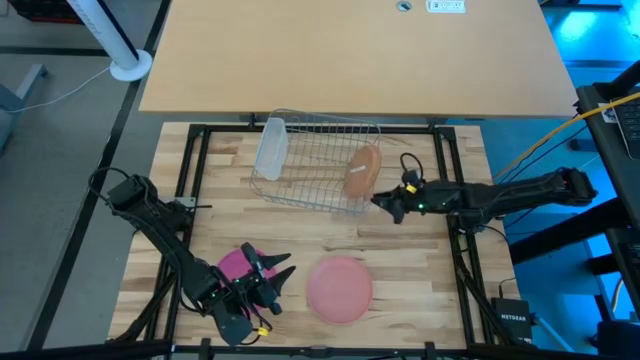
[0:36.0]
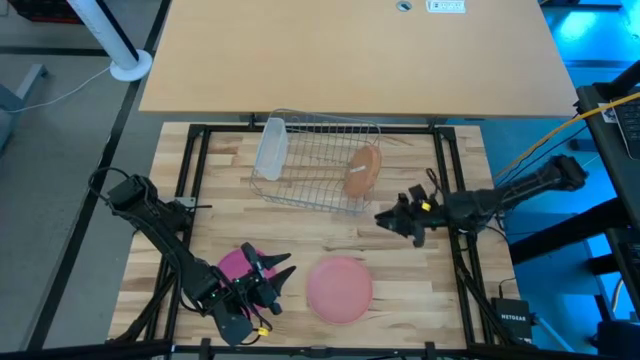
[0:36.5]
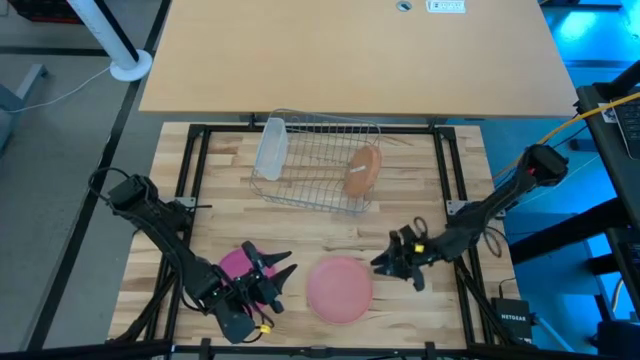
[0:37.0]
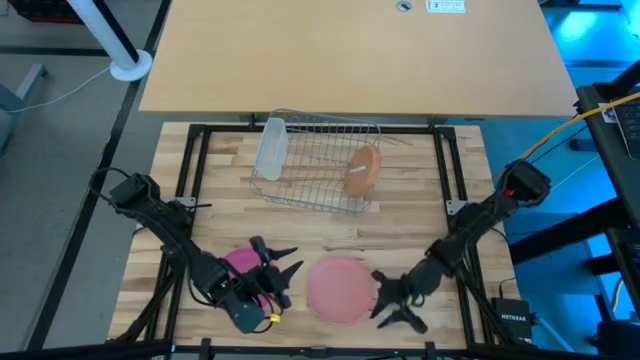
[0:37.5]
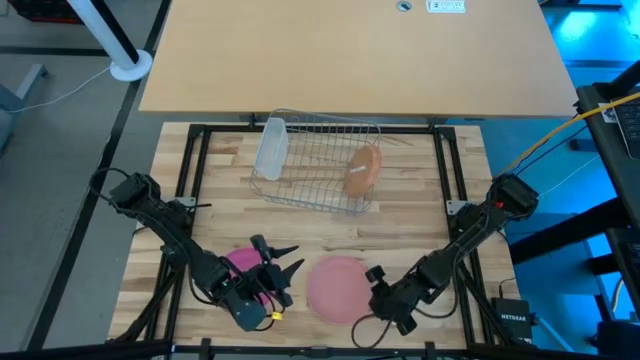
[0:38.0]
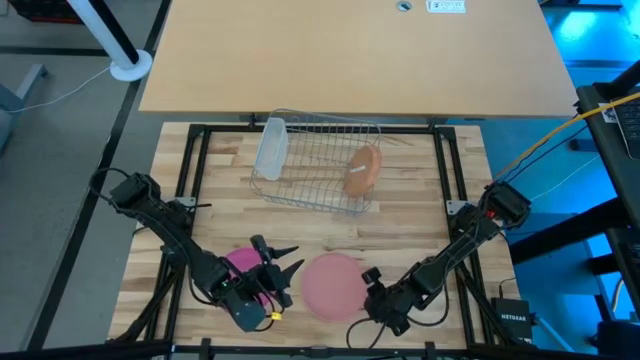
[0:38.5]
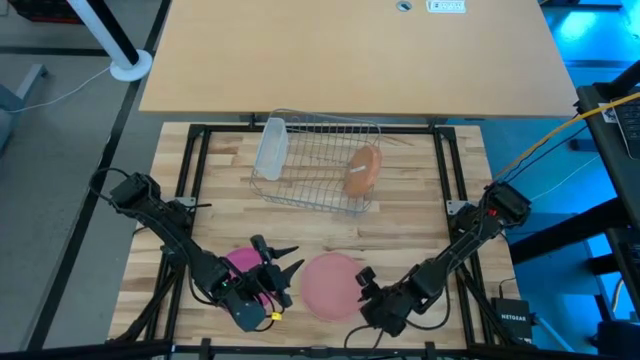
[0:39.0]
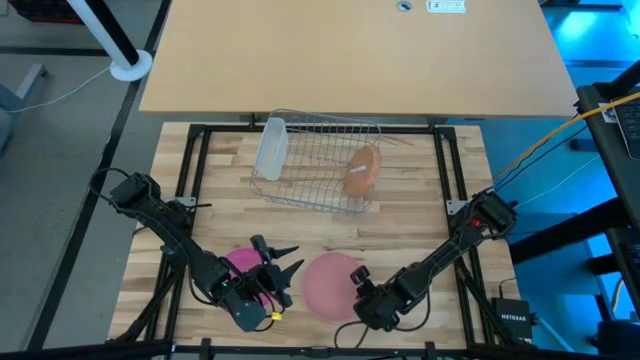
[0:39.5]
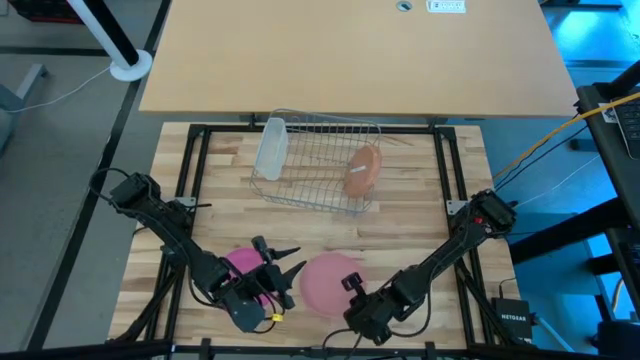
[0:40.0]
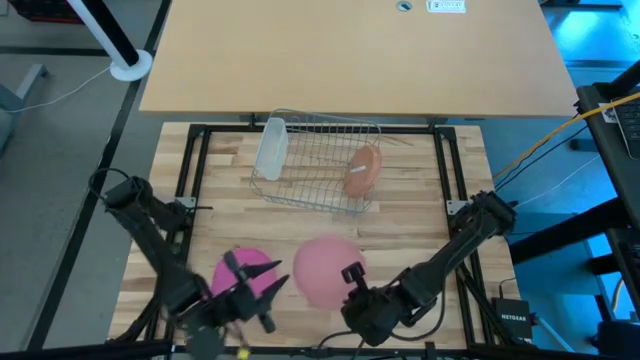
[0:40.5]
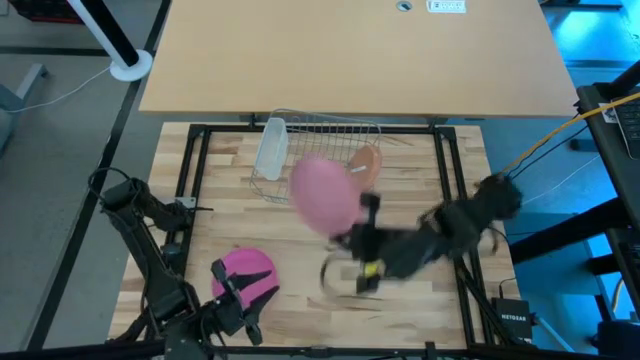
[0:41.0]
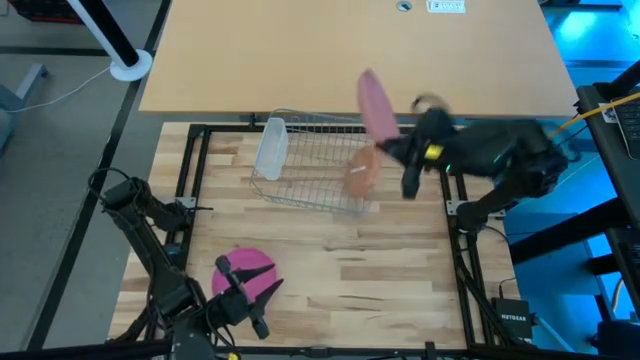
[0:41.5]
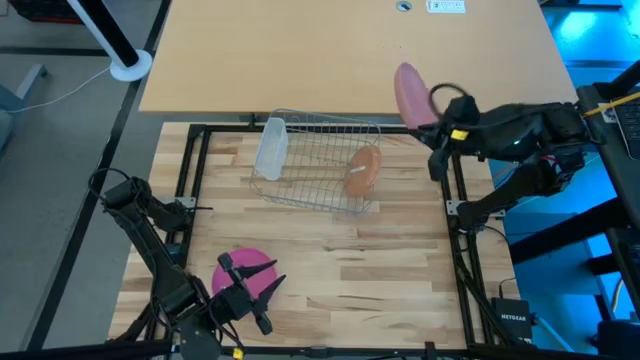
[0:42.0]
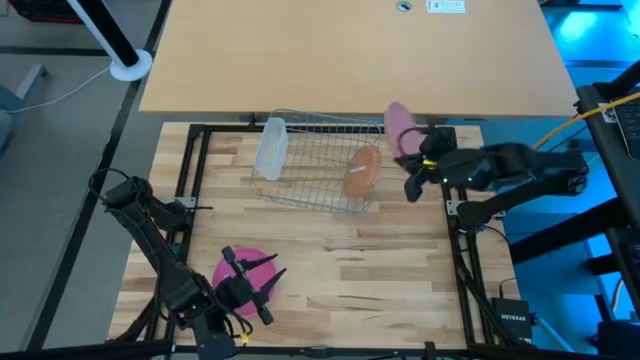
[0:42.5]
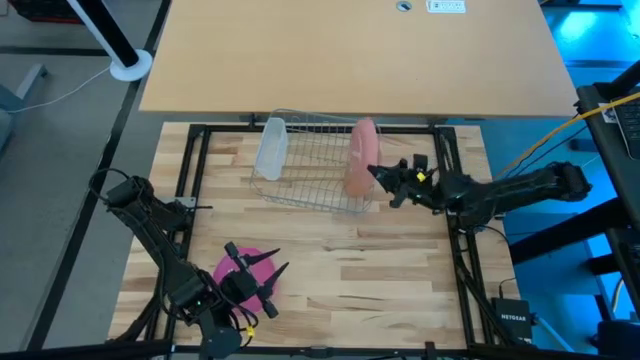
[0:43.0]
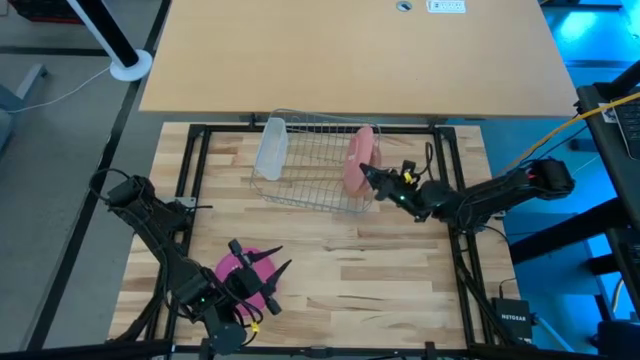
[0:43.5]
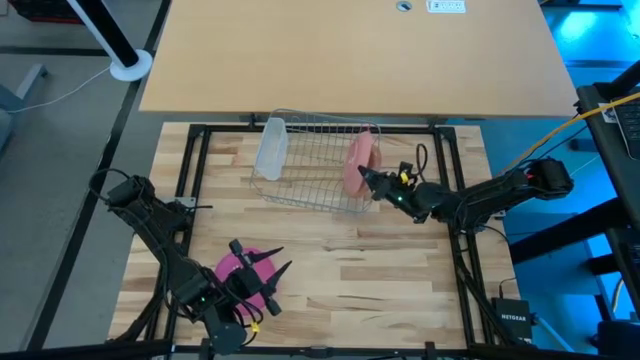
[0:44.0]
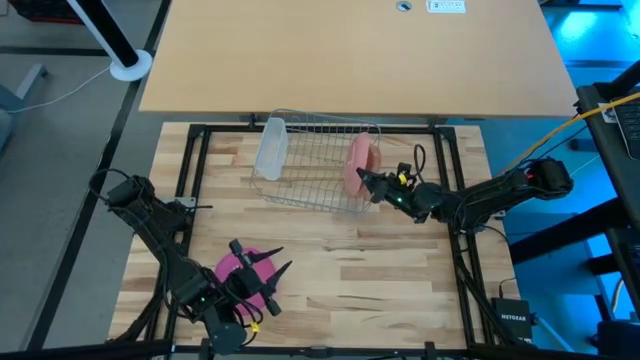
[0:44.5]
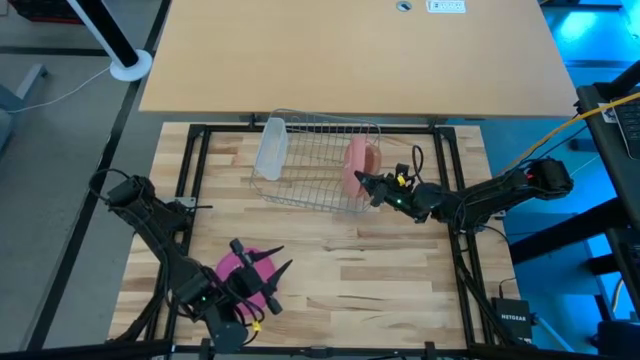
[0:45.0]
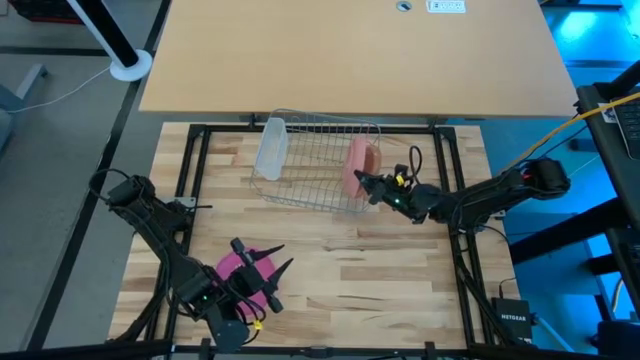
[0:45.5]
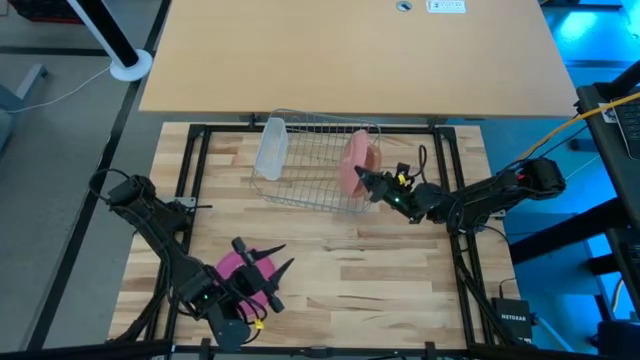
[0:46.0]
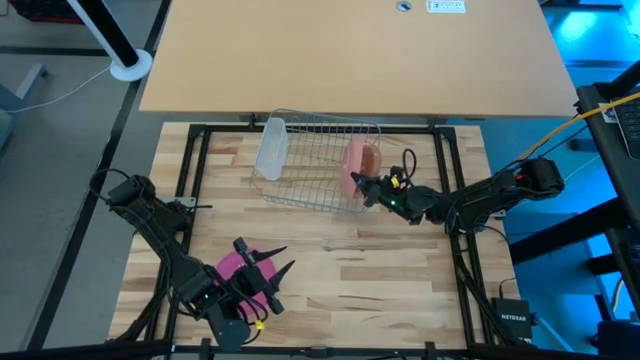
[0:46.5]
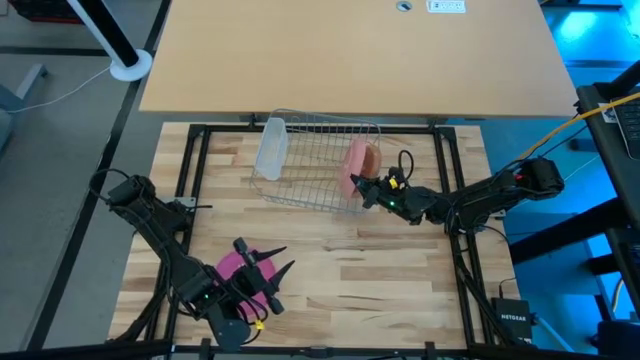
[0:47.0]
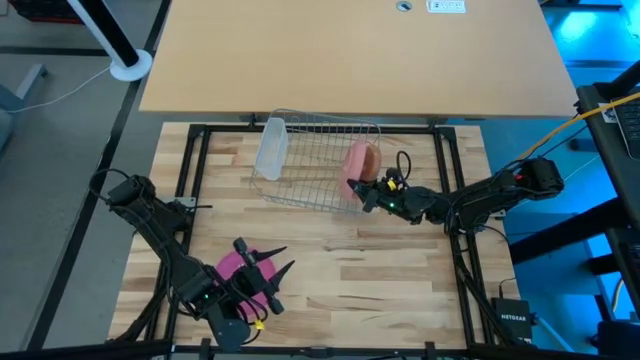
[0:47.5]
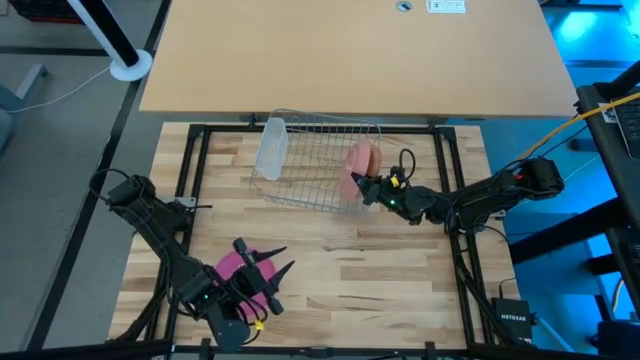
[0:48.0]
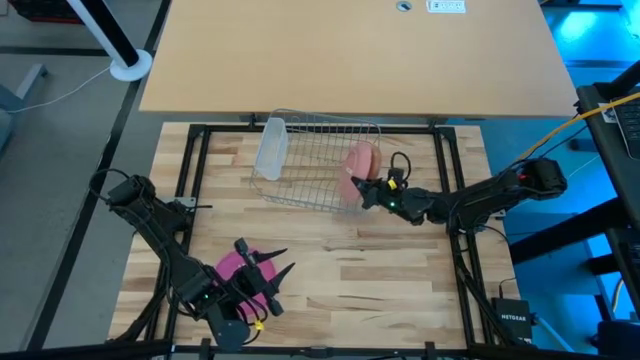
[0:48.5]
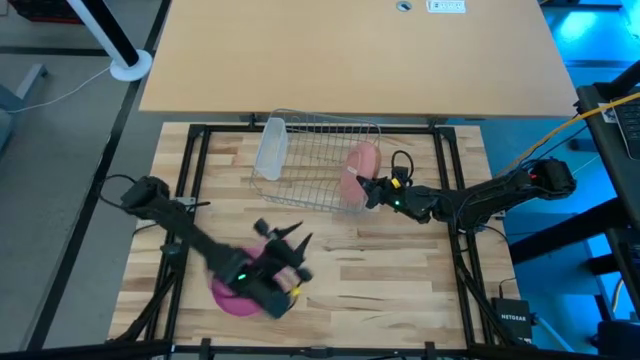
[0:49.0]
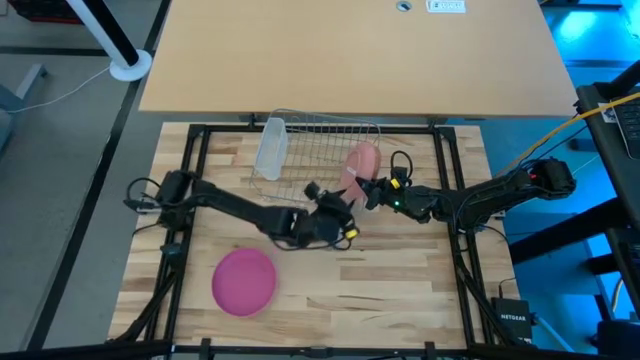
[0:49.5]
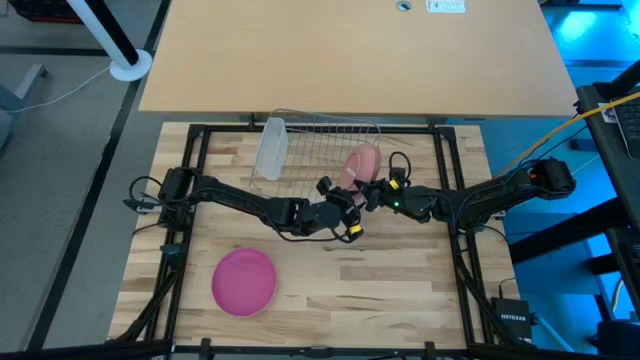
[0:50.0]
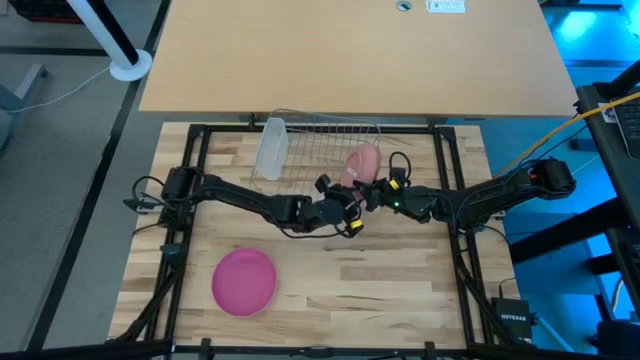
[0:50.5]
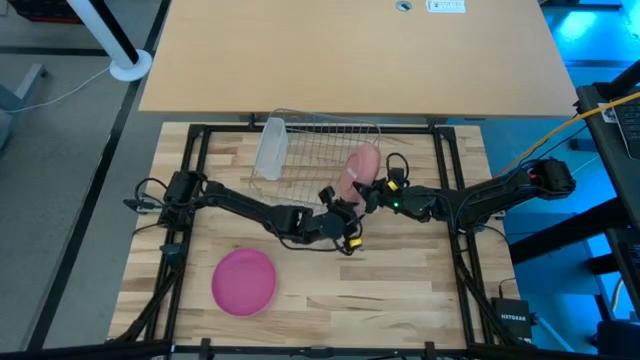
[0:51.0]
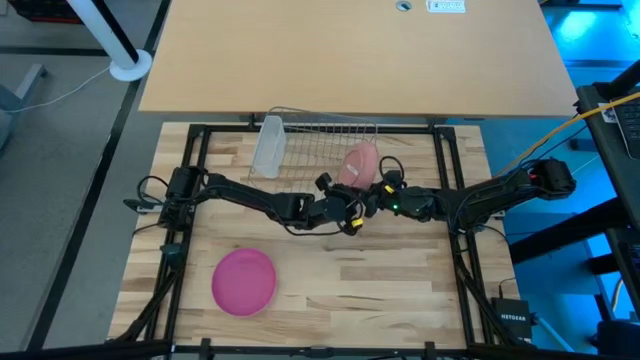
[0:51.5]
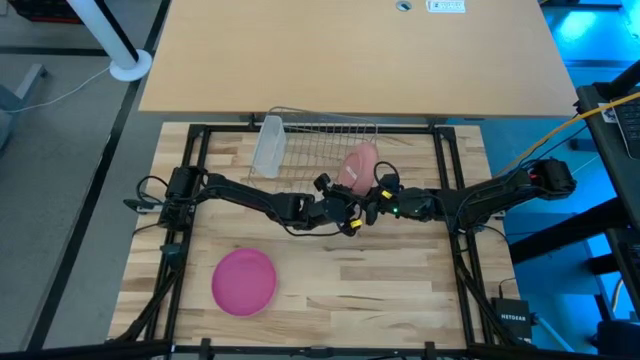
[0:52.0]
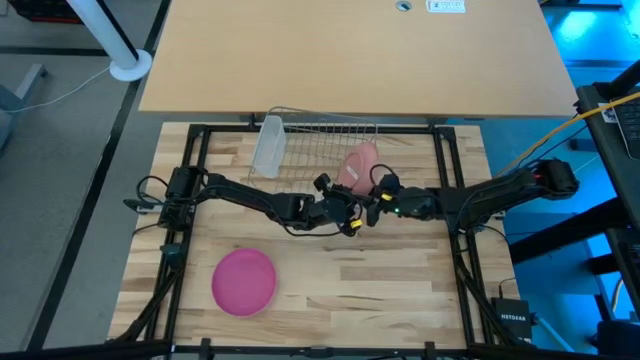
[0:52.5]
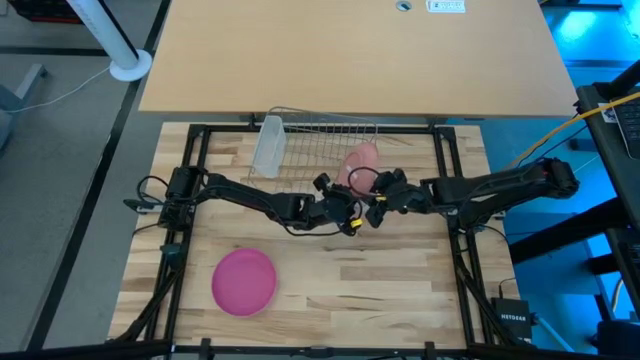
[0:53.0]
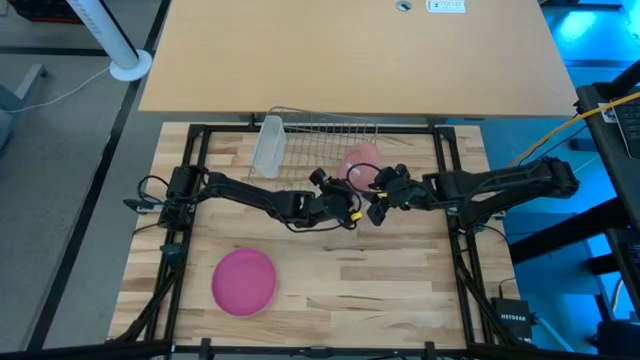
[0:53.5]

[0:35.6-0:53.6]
Task: Sort dishes
Put the light pink plate into the dish rack

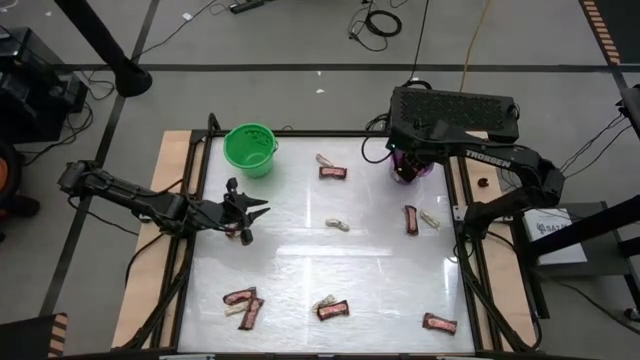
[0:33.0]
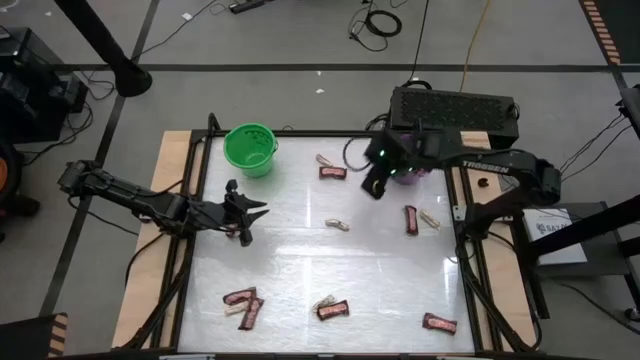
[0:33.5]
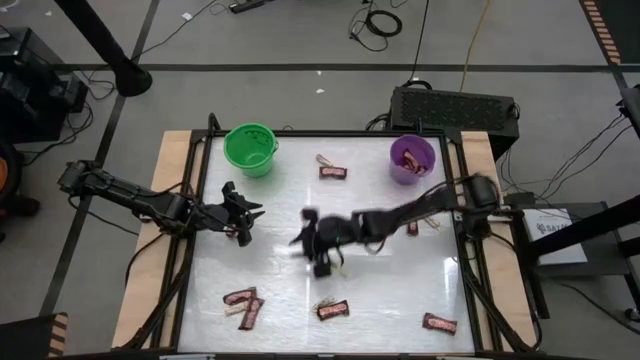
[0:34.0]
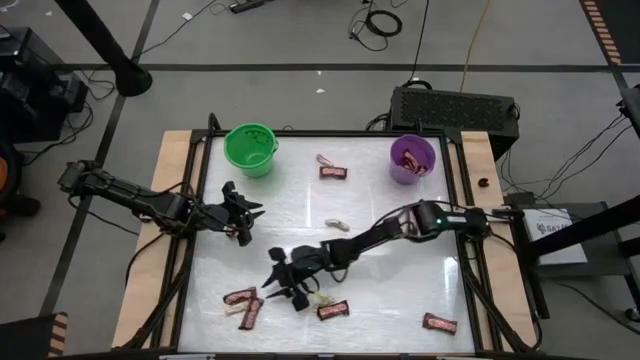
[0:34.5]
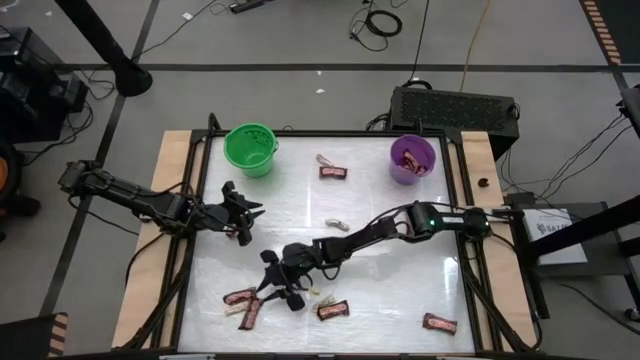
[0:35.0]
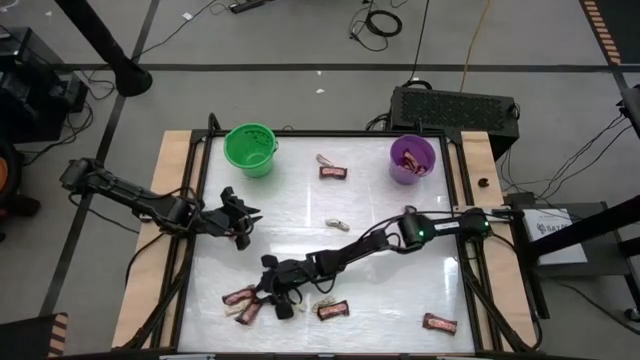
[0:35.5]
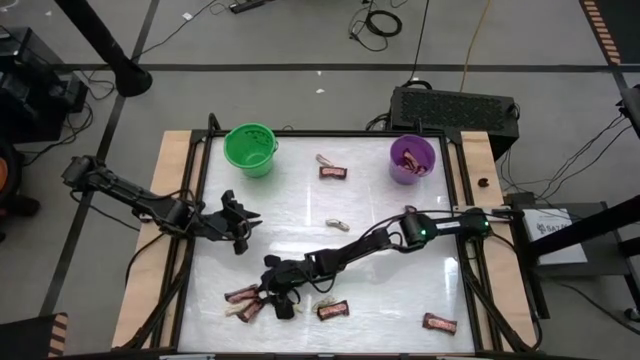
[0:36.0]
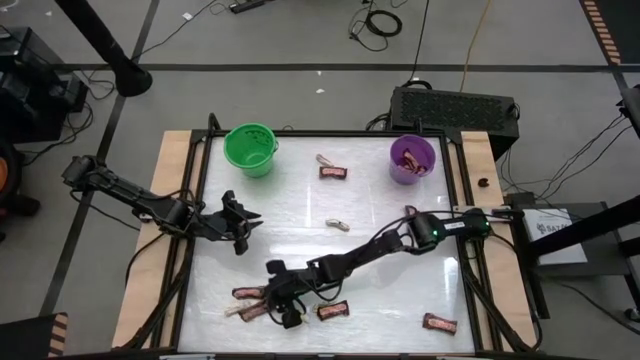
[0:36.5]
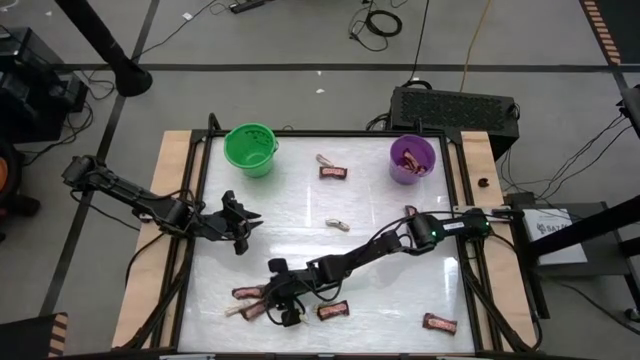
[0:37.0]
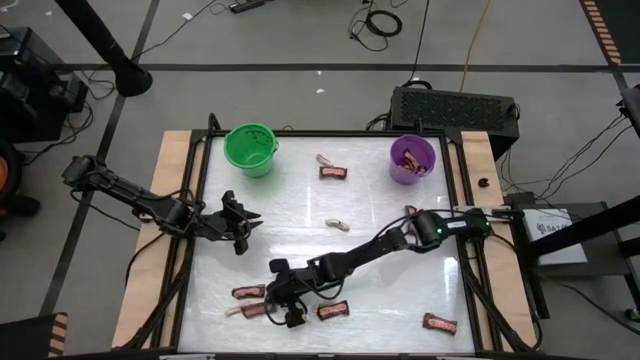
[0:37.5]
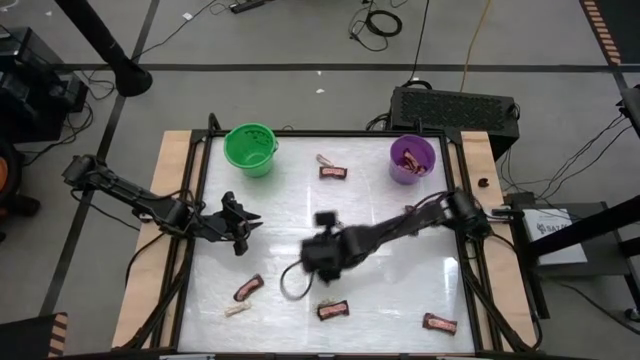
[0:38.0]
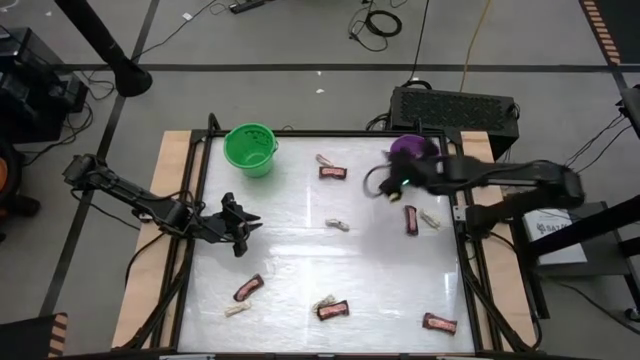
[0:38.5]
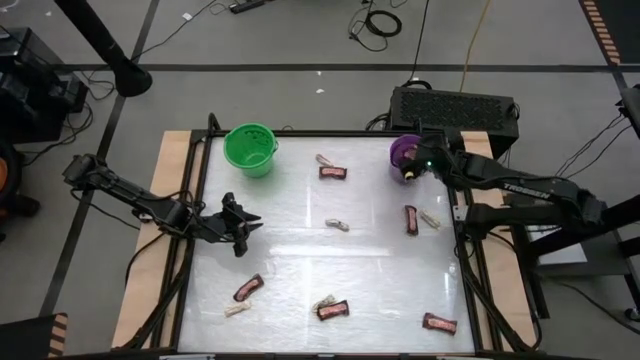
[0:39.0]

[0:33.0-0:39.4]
Task: Sort candy by brand, put in halloween buckets
Put the brown chocolate bar into the purple bucket
